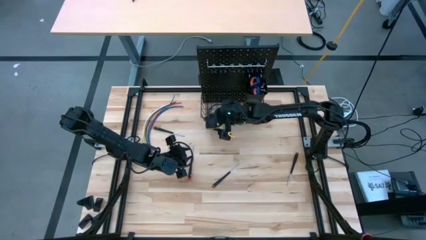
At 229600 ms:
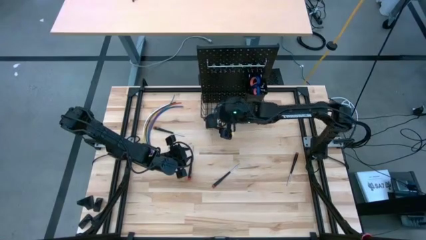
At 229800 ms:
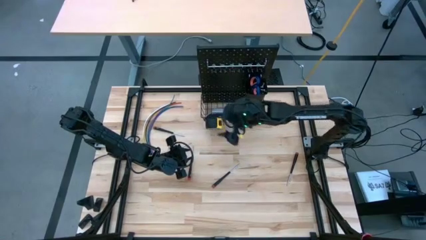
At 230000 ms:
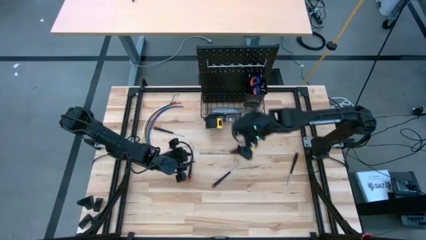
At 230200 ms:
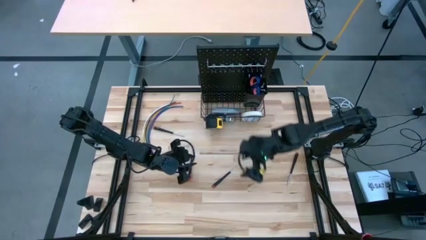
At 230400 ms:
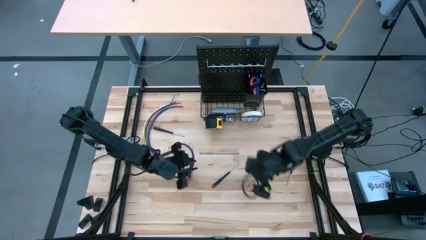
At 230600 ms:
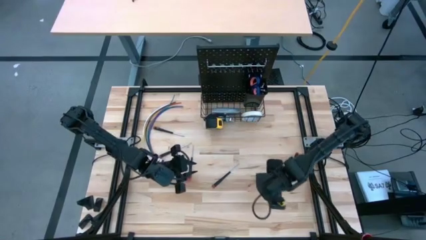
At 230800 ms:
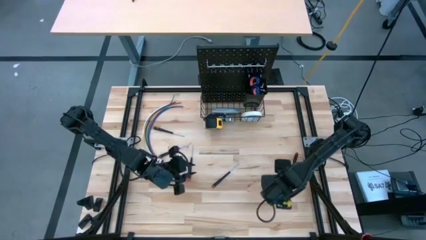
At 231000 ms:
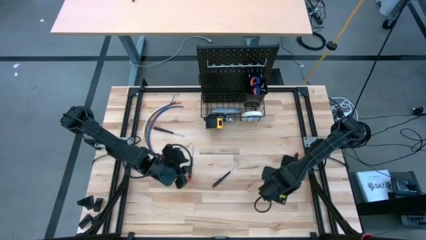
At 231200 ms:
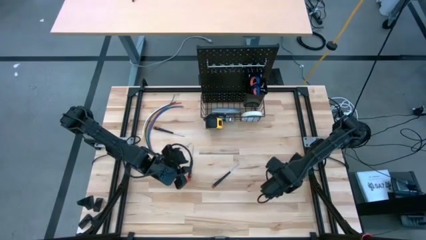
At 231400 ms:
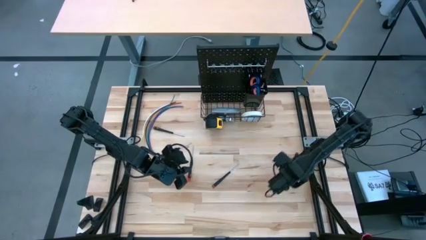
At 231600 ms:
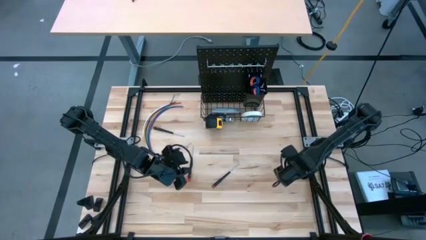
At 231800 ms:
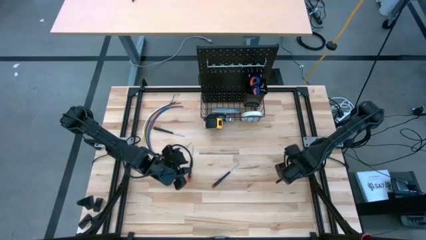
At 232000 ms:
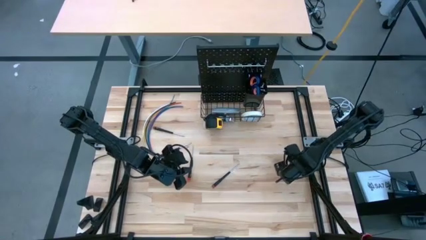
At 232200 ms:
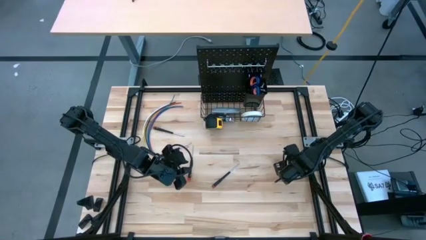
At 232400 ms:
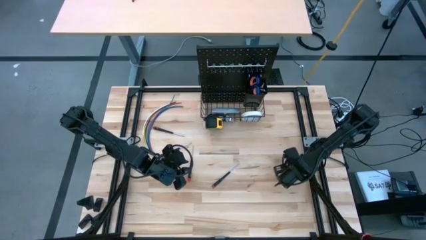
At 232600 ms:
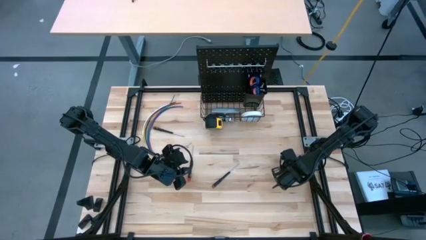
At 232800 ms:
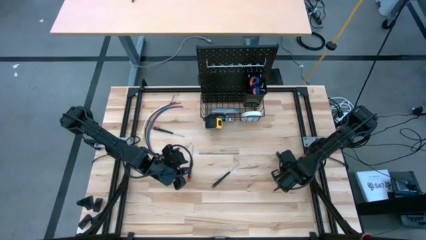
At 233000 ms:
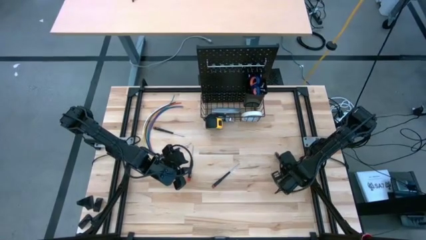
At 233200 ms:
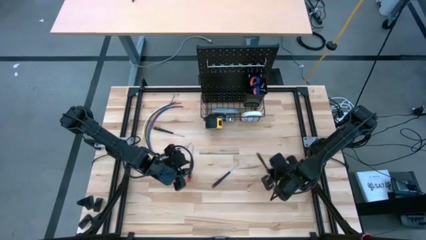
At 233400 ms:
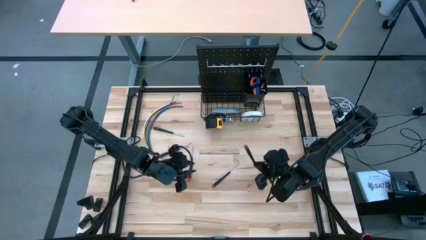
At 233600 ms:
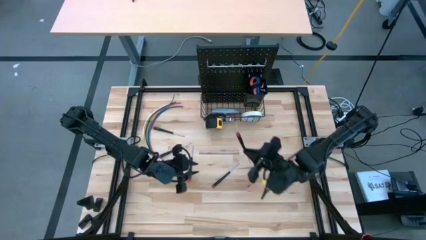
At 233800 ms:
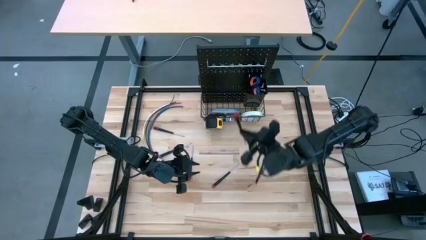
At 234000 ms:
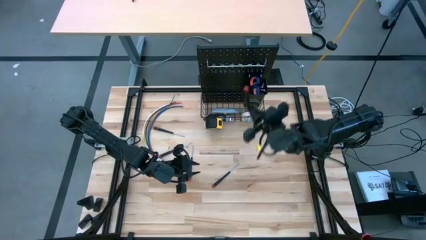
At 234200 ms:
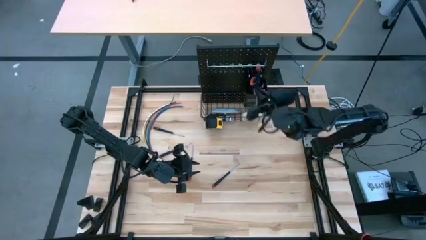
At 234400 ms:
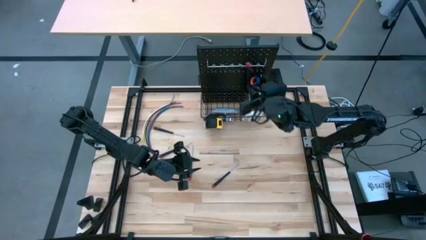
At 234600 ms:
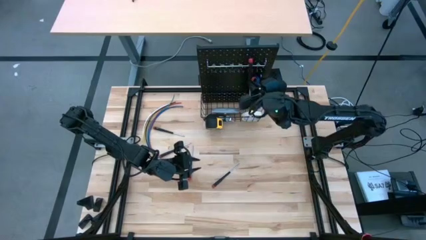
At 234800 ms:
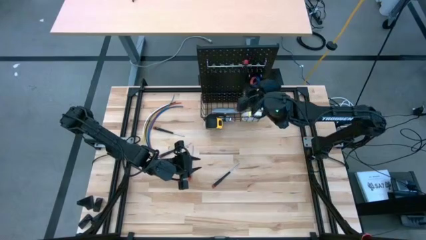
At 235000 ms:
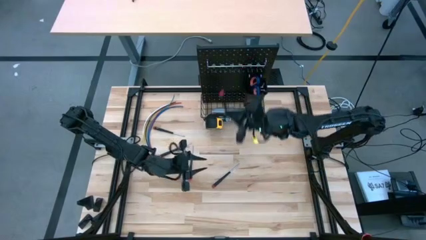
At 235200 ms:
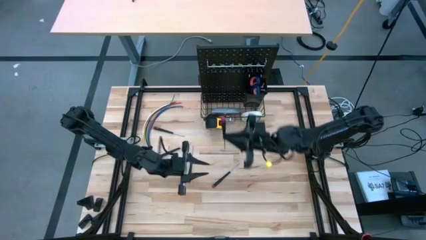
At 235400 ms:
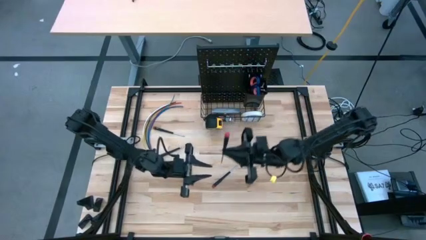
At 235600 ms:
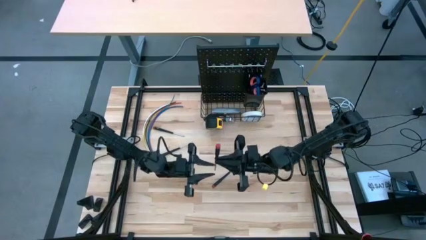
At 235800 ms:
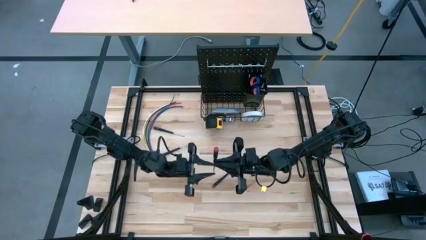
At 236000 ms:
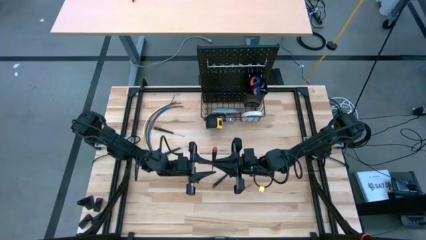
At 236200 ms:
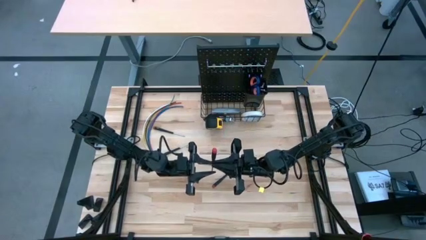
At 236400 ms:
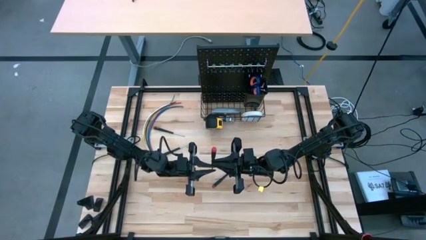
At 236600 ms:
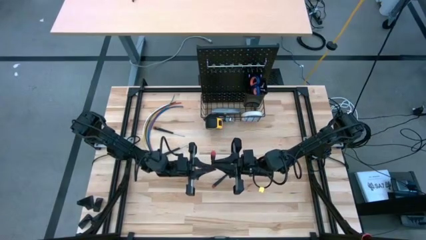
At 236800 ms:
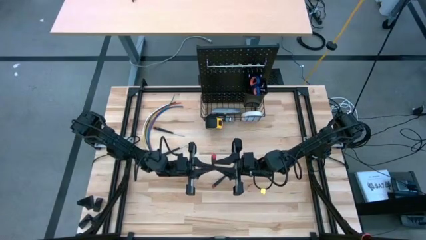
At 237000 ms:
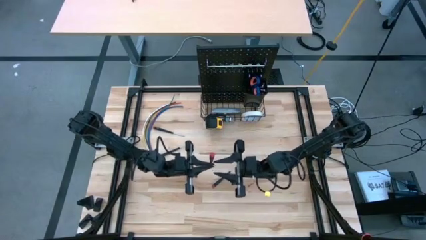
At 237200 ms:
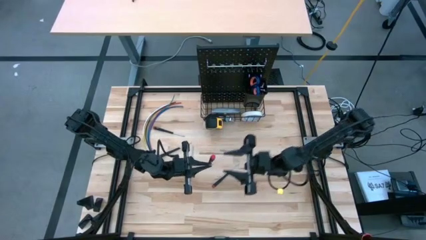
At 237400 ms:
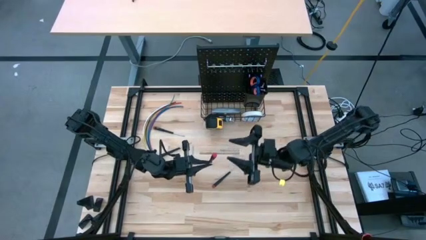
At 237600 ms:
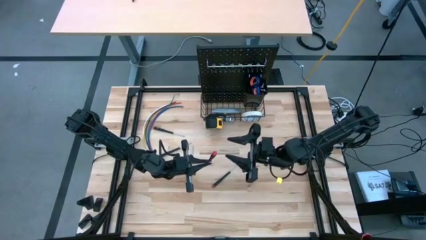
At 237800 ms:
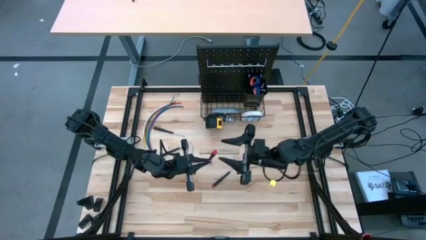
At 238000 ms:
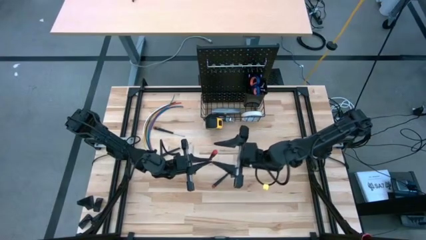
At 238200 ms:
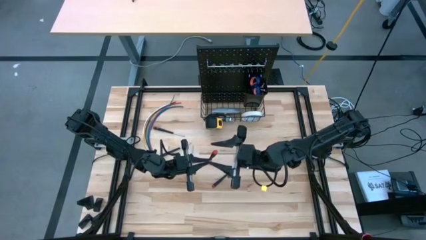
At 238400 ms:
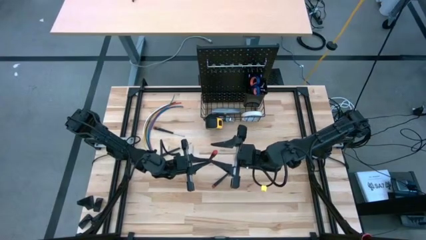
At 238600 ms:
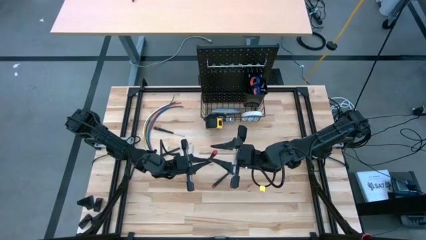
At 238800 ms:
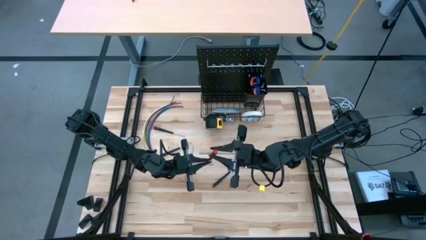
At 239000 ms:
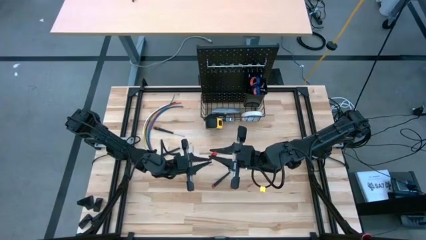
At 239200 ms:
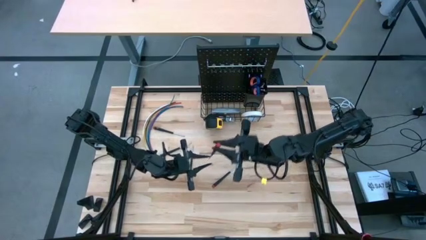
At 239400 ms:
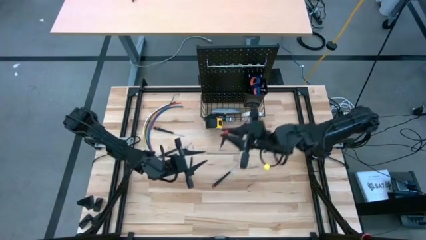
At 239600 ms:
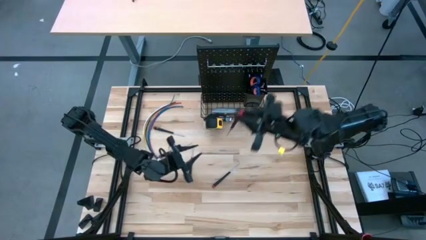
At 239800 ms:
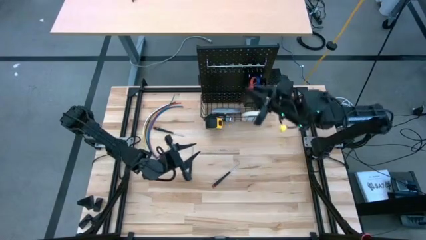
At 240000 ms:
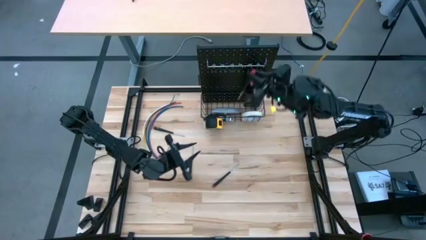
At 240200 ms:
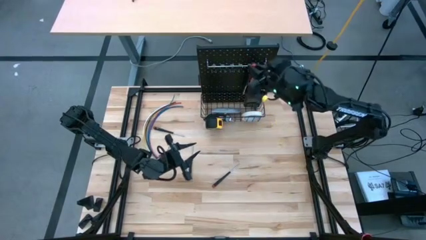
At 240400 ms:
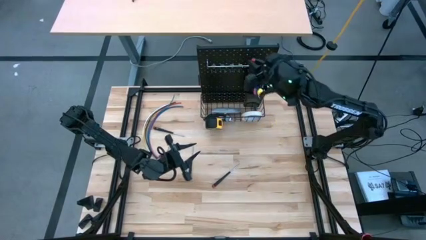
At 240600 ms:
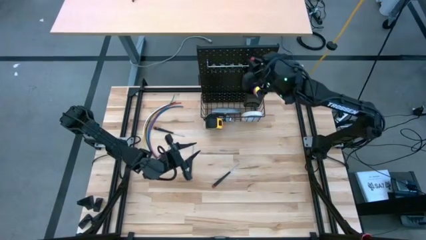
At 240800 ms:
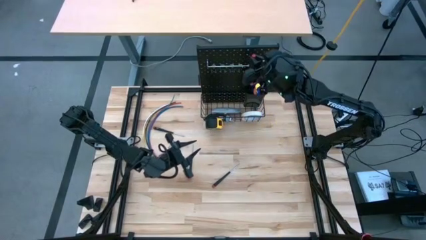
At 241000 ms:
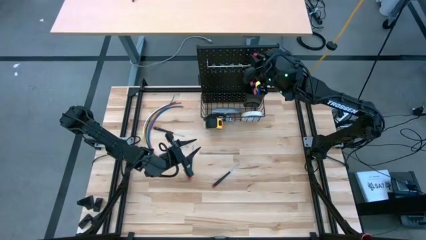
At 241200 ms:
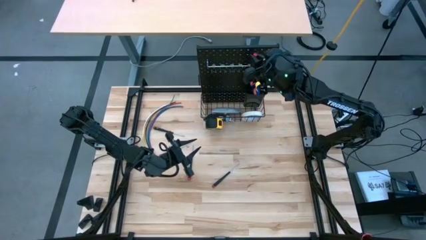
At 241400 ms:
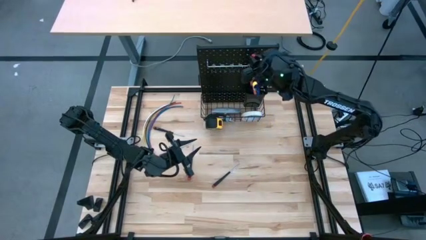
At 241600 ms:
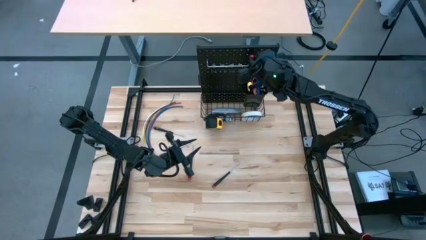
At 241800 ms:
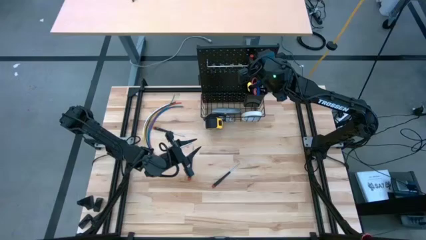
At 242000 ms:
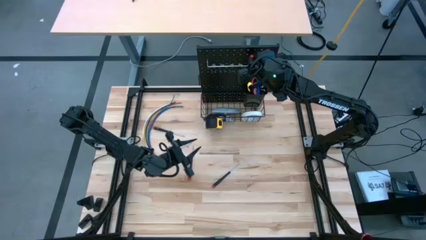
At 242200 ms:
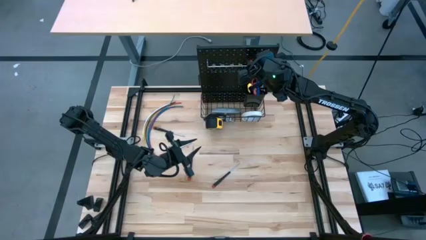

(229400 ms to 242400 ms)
Task: Hang tools onto peg board
Hang the black screwdriver on the pegboard
